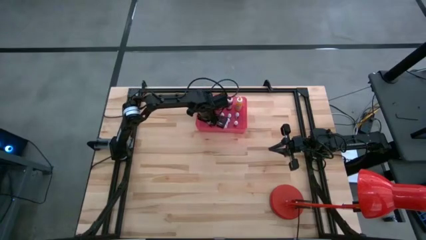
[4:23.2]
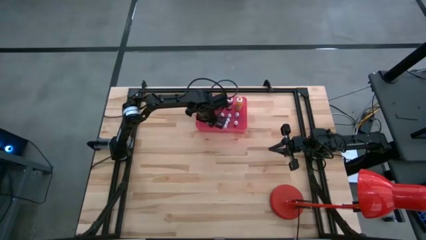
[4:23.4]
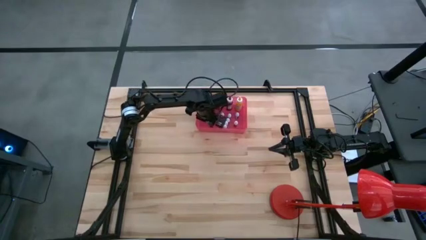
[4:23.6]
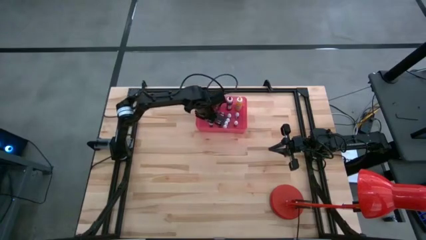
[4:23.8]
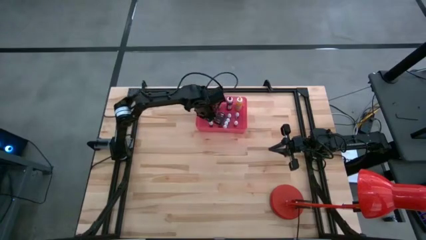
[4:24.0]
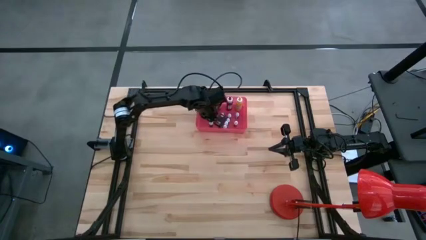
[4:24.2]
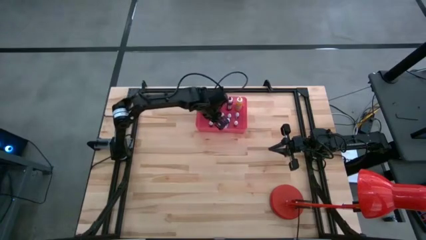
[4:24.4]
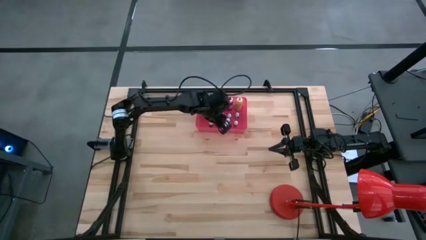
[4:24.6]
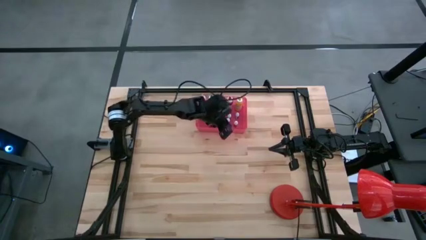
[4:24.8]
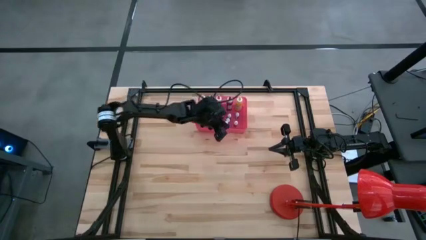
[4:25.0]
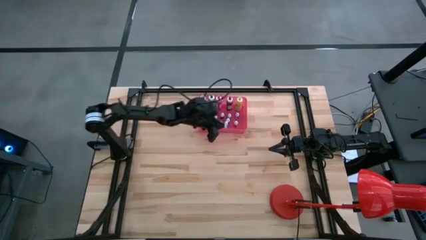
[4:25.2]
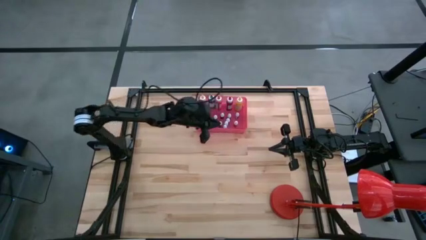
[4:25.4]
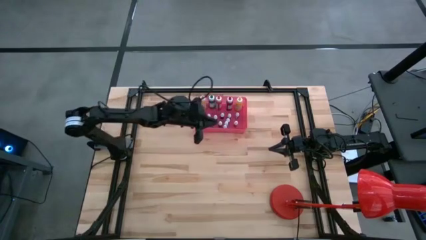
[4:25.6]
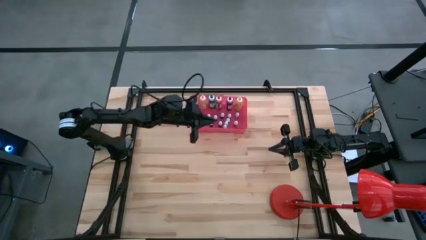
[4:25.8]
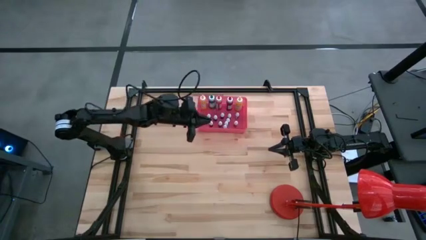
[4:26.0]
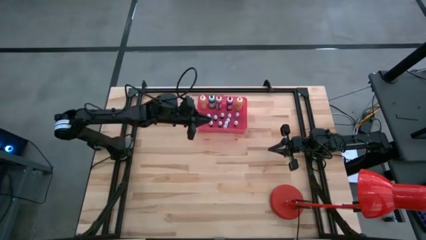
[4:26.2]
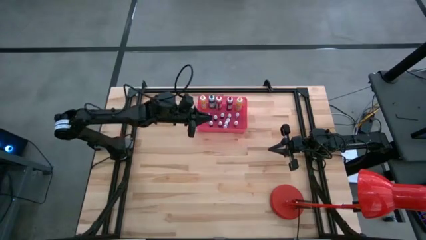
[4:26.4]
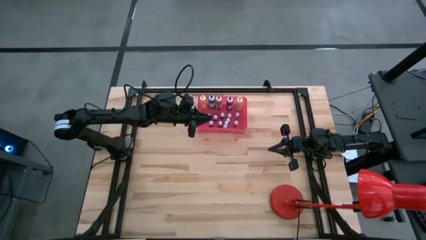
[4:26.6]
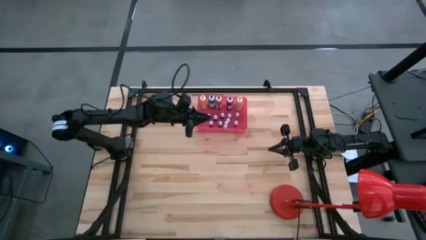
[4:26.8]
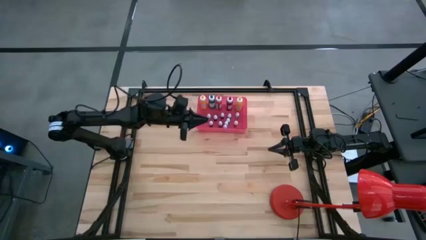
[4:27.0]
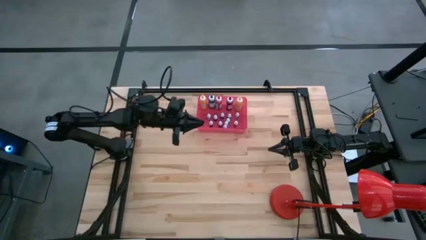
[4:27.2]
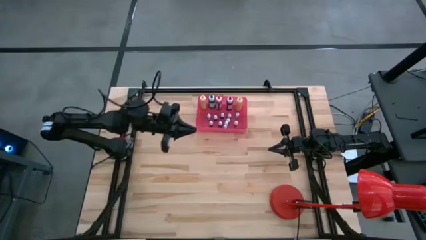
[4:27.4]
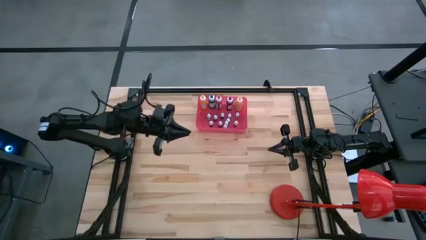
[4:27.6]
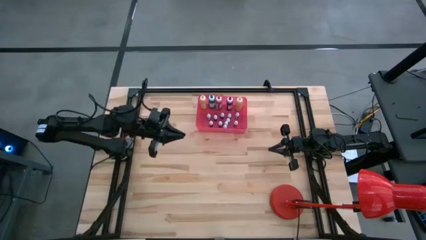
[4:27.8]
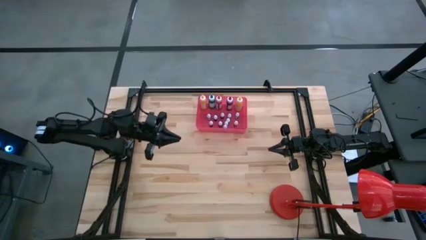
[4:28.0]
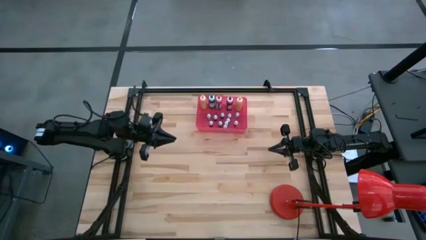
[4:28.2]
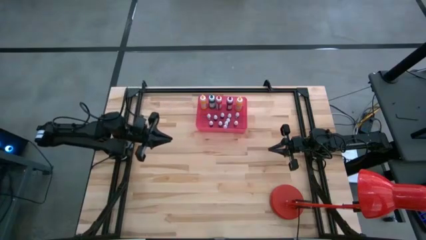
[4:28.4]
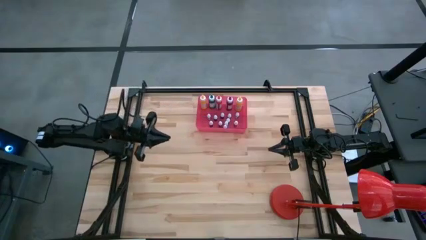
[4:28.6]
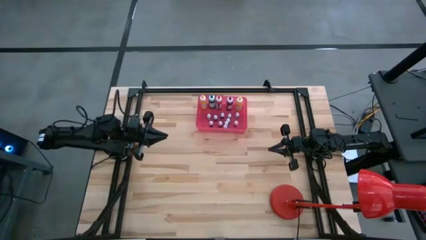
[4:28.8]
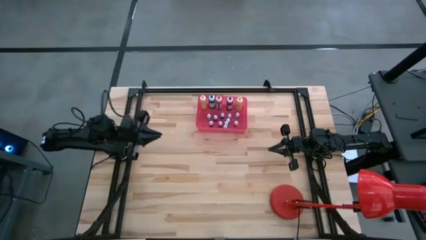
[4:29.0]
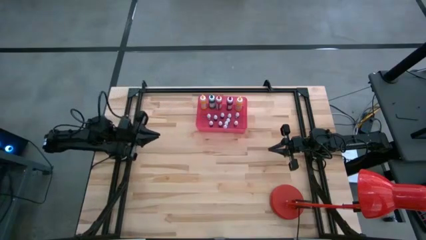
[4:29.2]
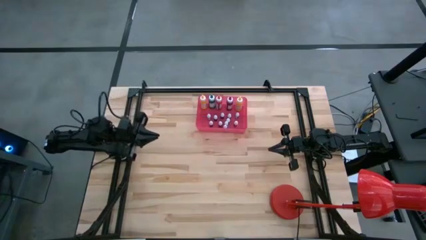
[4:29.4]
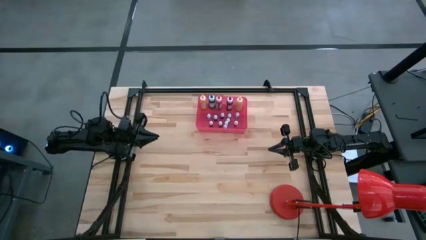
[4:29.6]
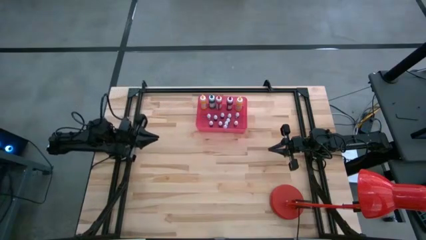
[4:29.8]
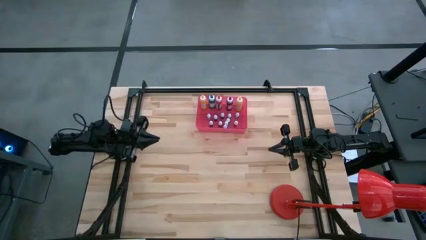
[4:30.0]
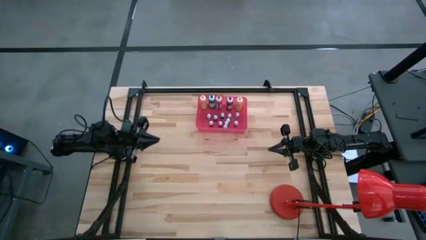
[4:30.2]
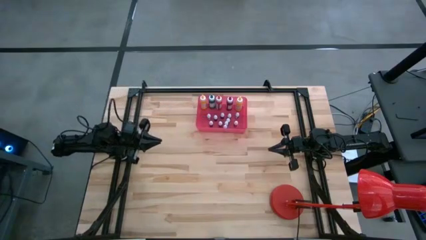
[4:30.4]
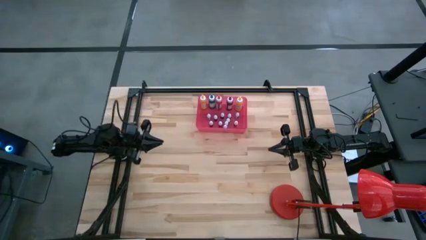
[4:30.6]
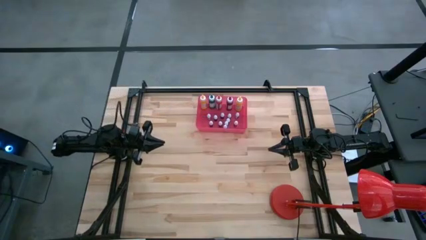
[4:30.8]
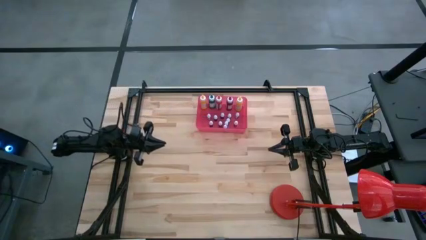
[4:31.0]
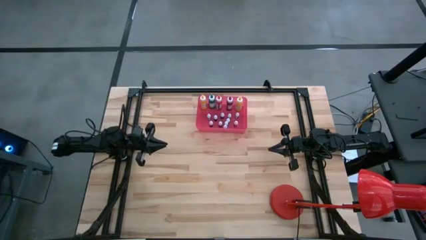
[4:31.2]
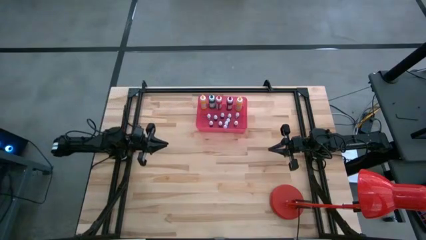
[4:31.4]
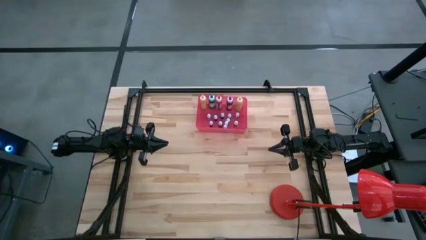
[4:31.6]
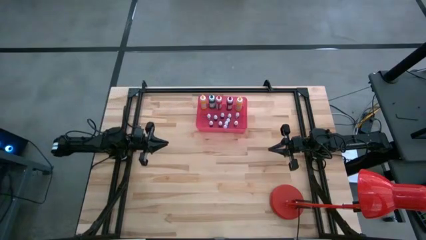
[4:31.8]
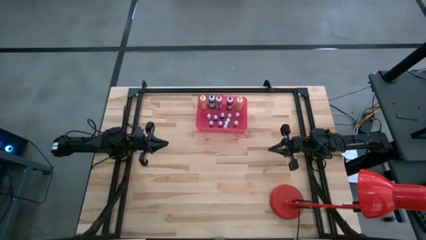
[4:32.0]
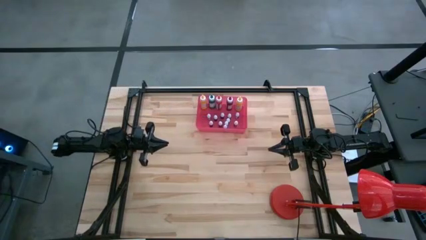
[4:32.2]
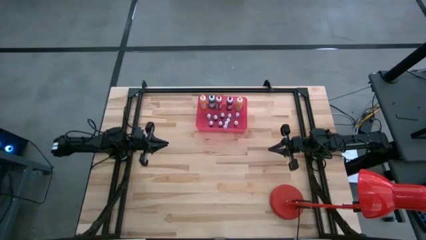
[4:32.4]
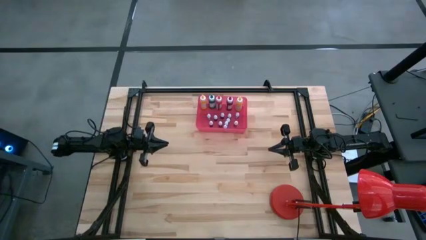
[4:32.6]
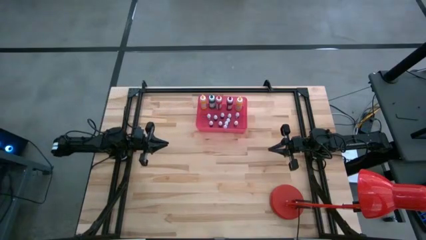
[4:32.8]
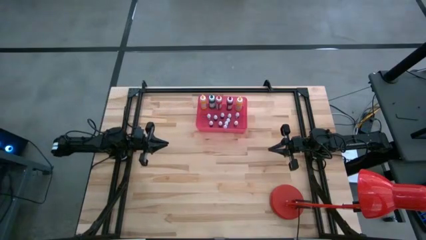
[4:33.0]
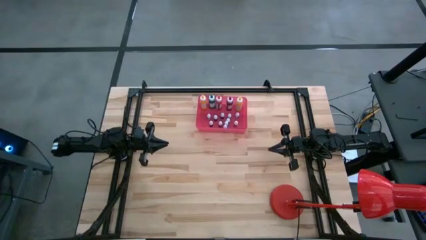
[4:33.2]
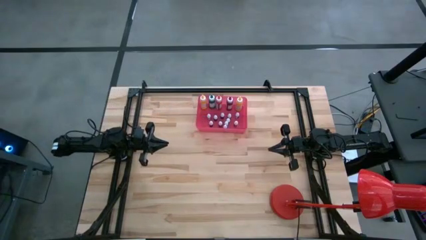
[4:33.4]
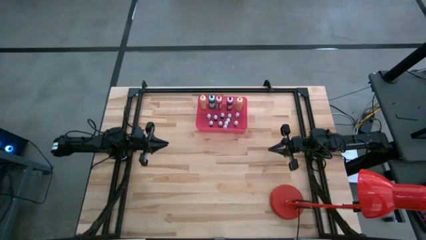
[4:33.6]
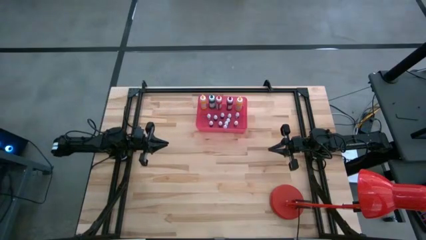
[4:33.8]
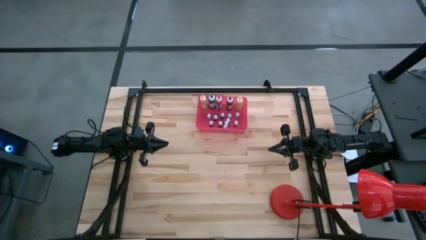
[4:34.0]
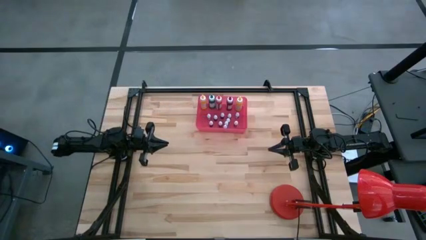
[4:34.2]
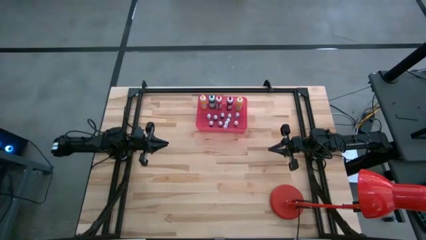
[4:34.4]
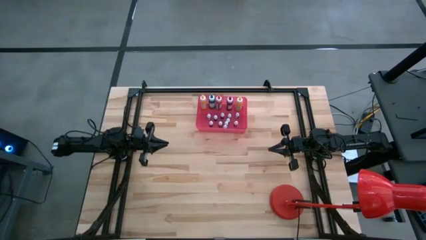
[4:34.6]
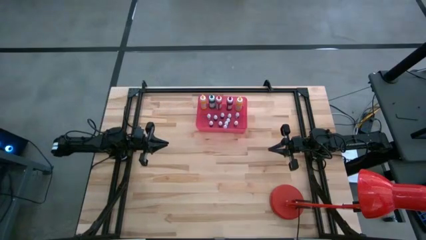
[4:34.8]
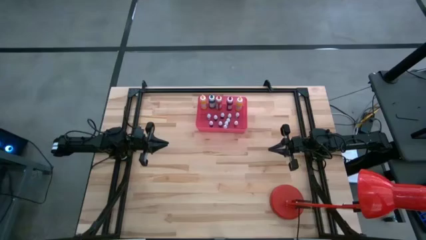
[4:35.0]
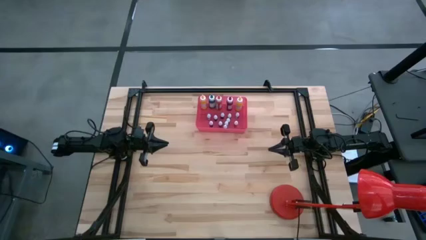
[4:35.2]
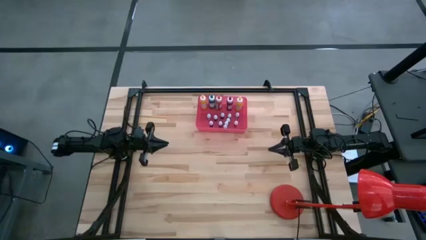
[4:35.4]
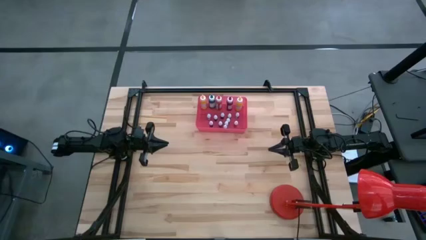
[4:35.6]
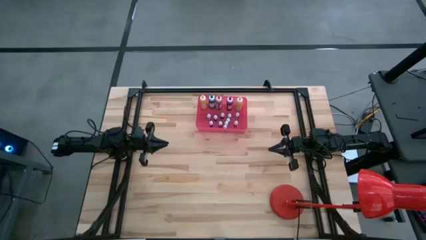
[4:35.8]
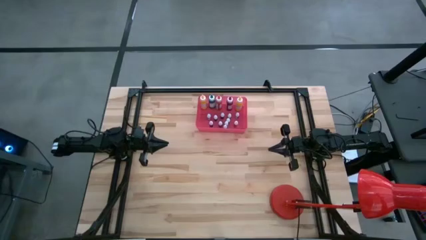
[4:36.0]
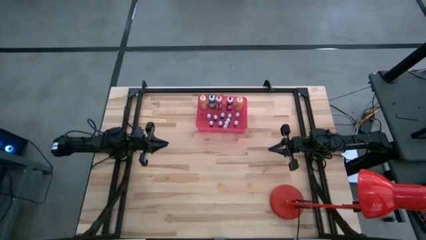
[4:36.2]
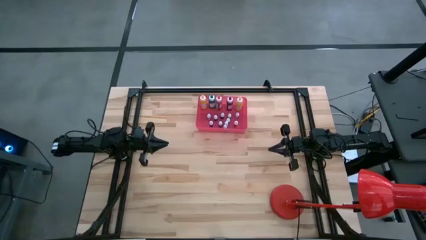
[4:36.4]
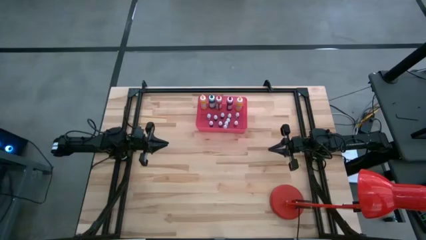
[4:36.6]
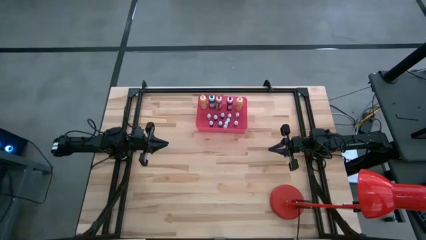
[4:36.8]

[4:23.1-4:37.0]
Task: Pick & Place food coloring
Return to Home Position

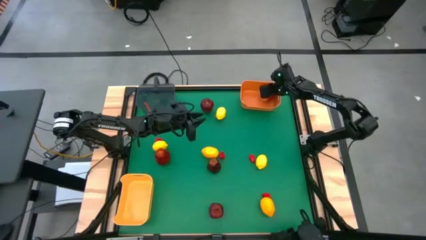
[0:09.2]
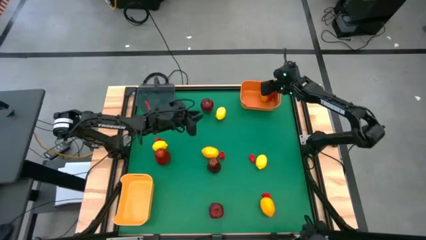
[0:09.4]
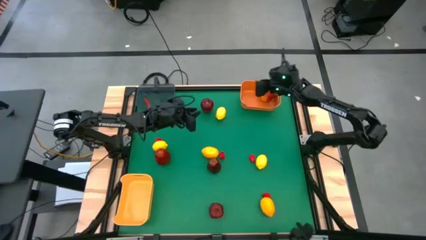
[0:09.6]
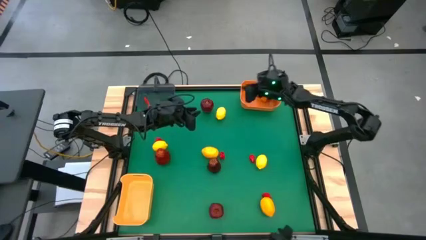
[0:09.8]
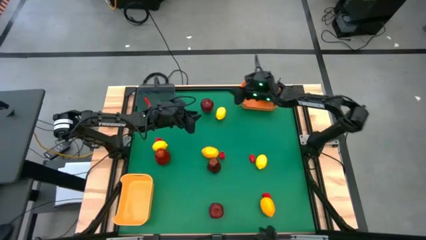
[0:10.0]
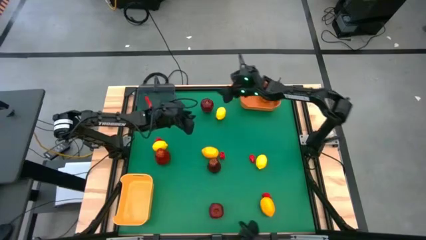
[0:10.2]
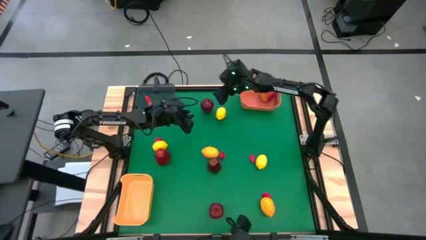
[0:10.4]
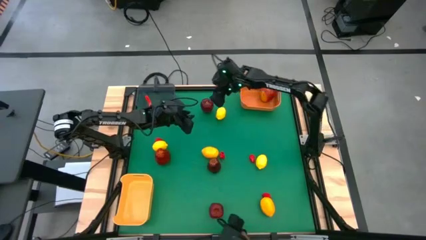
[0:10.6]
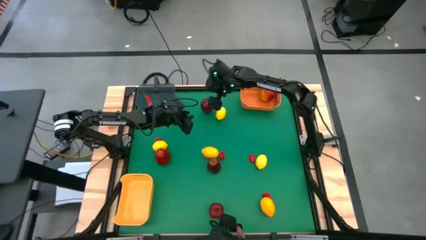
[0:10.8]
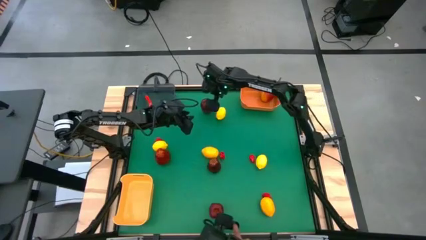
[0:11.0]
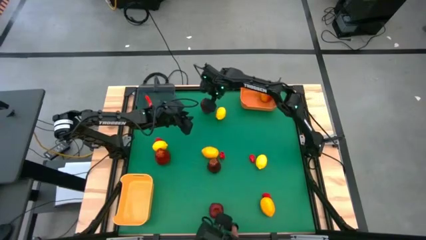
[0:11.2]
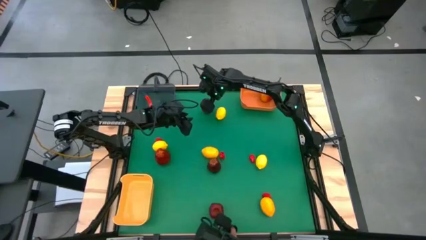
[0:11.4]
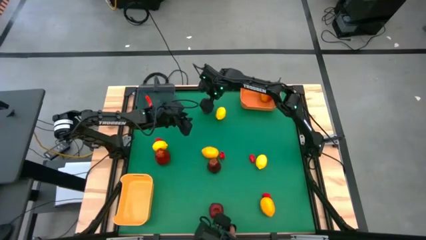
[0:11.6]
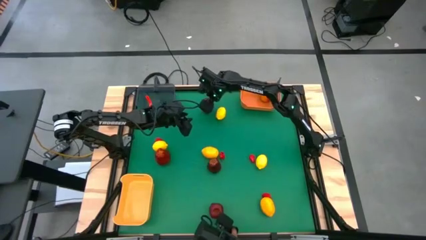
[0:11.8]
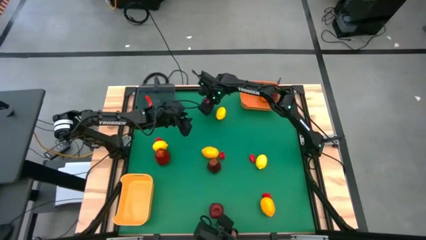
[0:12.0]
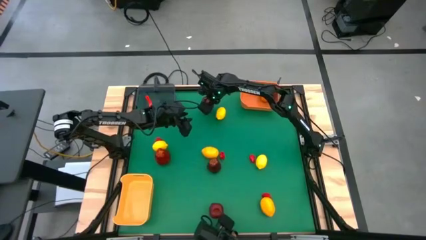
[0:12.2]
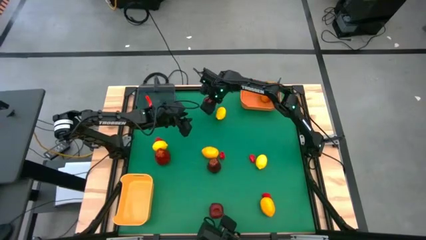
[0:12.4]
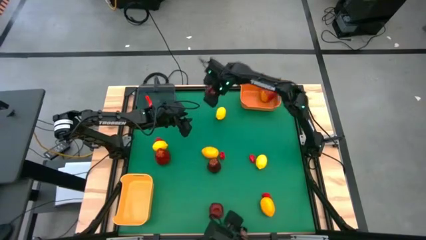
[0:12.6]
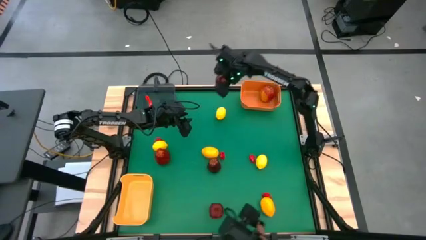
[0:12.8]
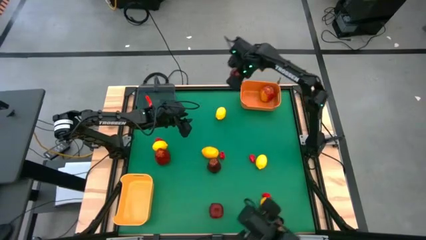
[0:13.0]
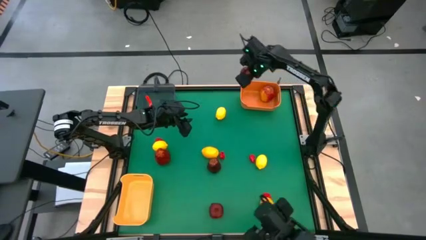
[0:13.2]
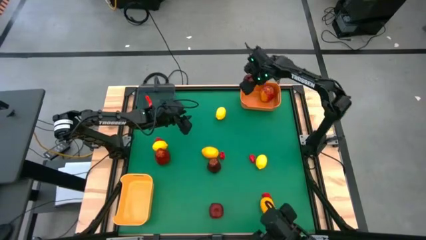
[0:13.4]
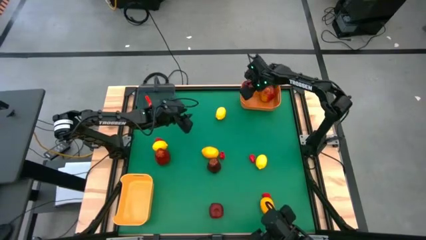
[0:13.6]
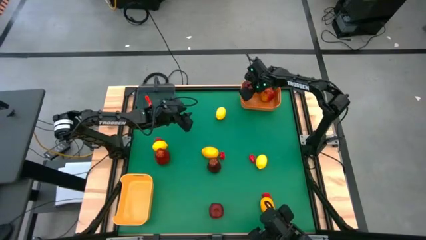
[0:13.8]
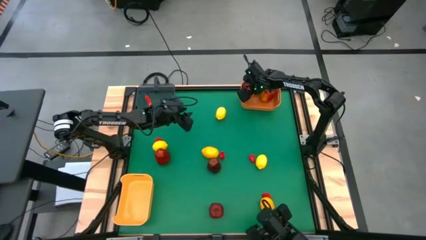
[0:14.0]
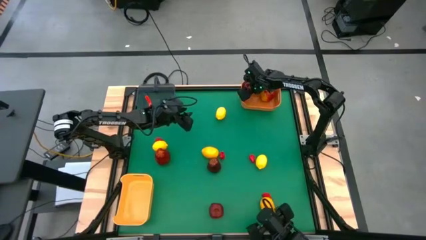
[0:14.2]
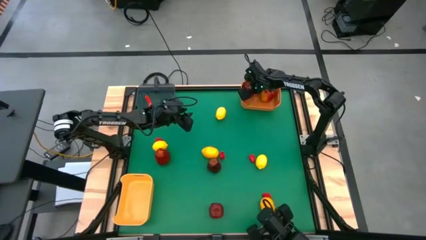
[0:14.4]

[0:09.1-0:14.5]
Task: Sort produce into baskets
Put the apple into the orange bin
